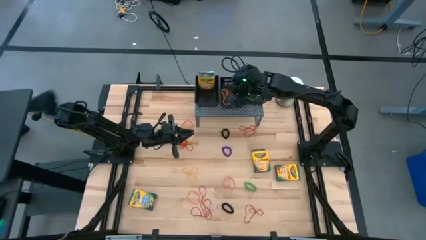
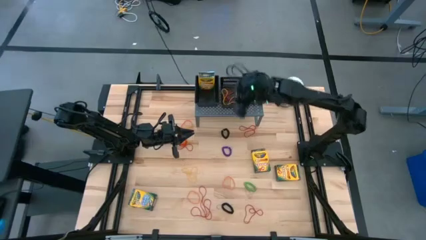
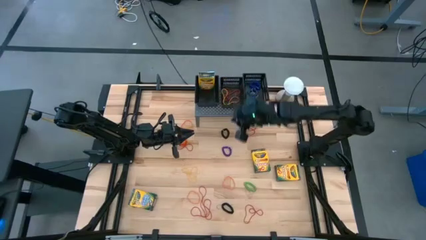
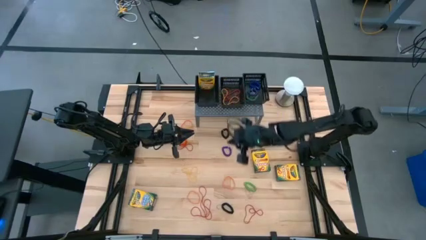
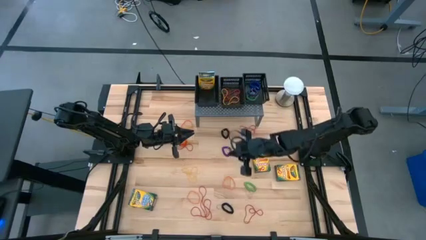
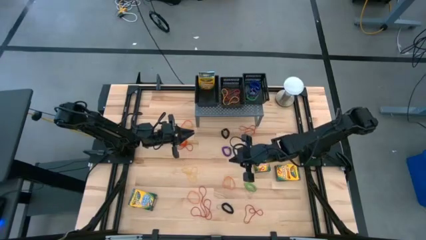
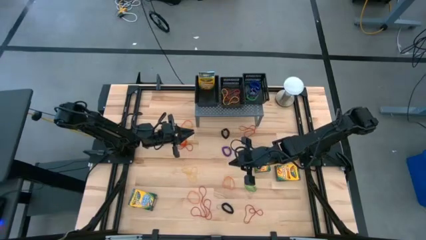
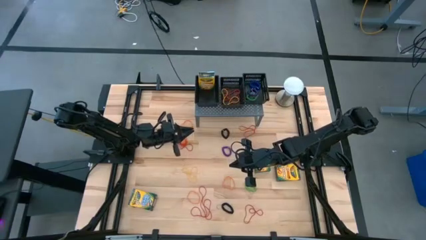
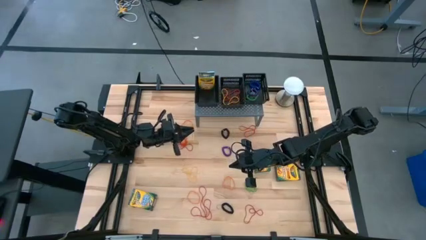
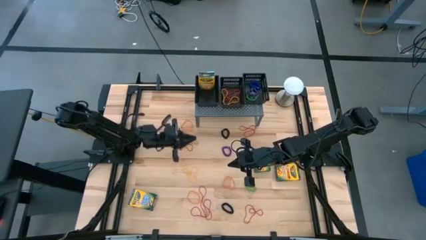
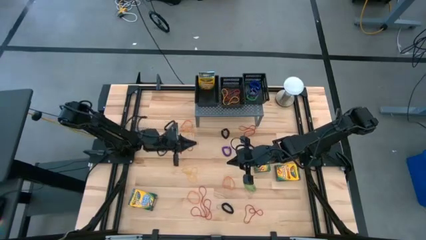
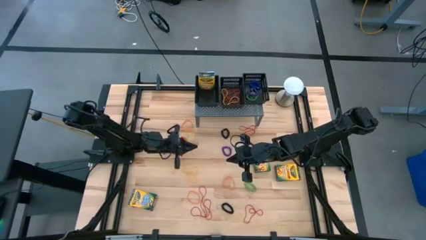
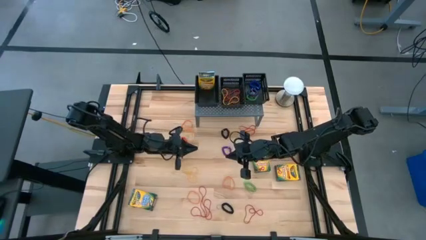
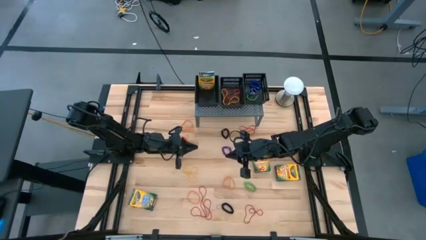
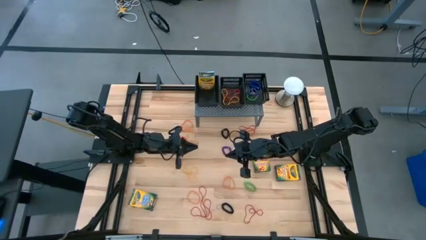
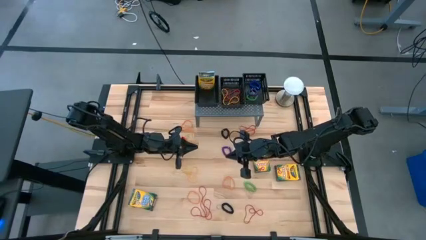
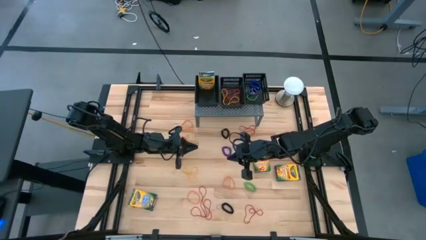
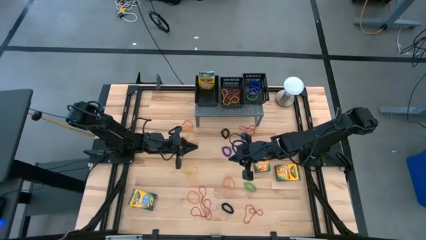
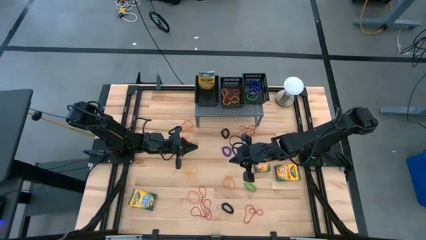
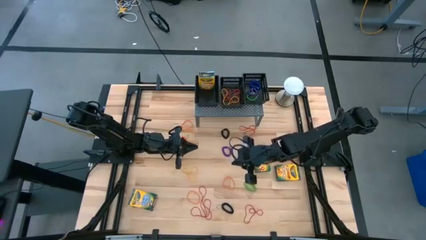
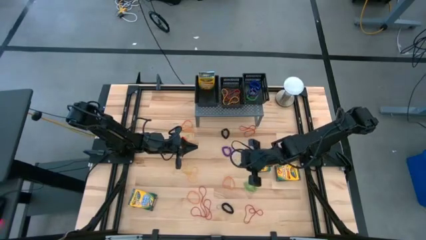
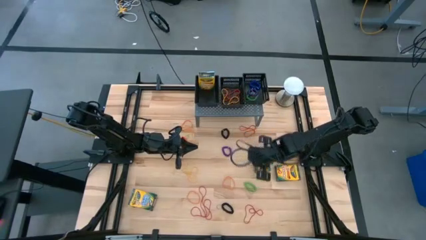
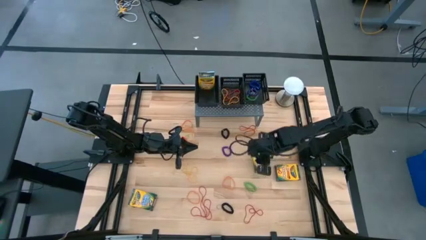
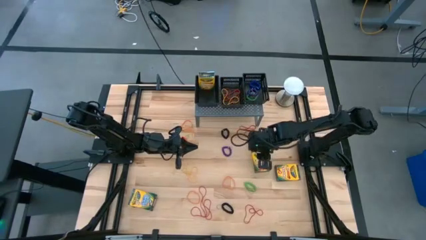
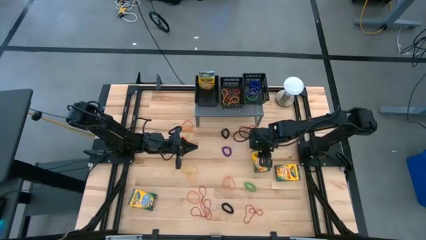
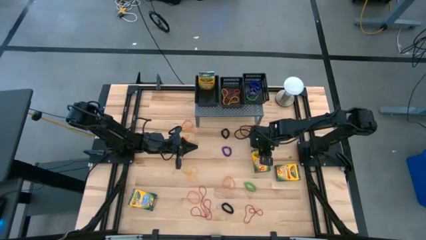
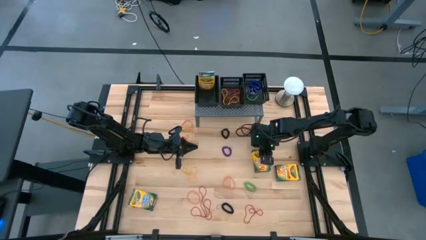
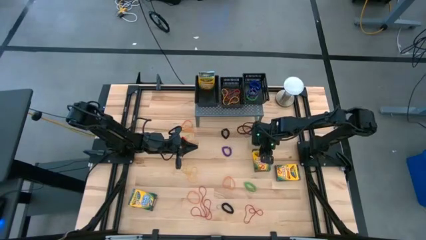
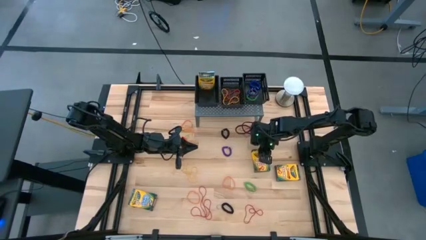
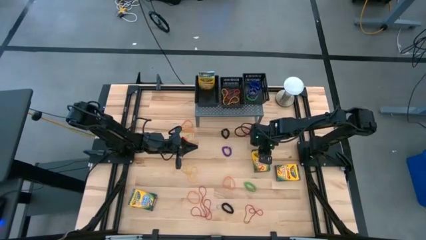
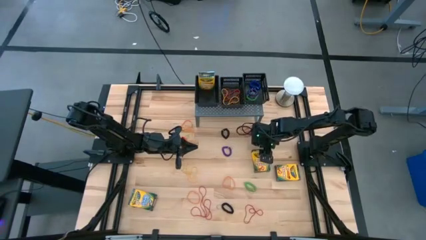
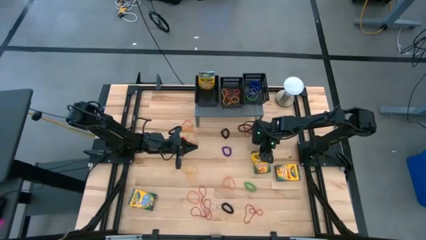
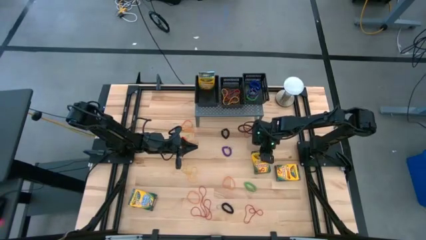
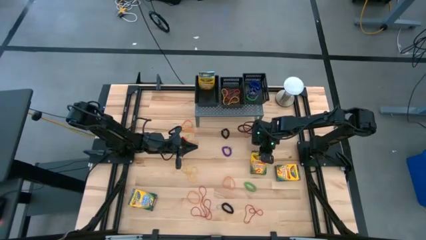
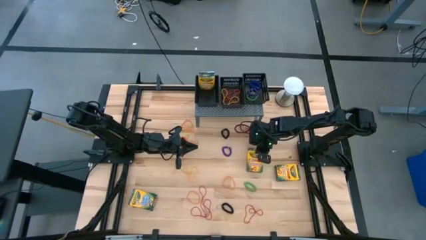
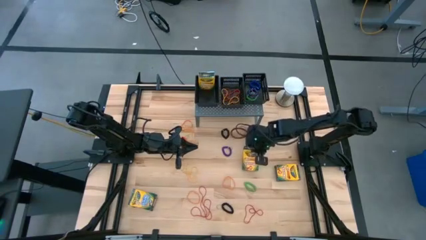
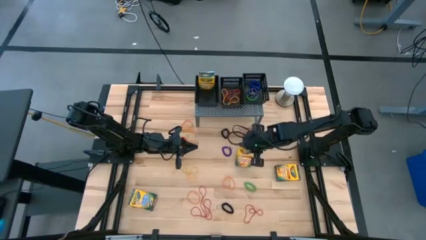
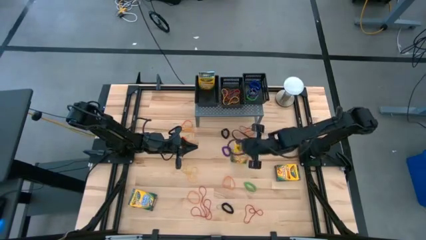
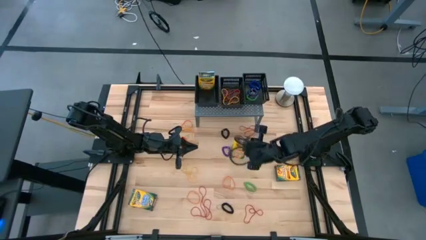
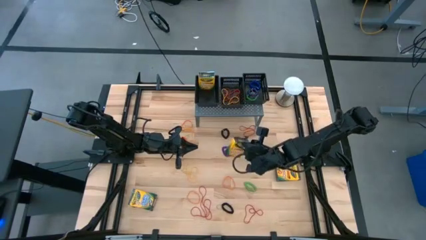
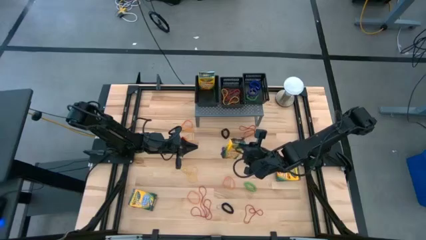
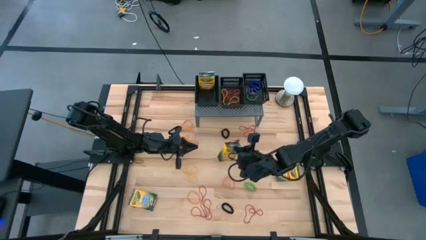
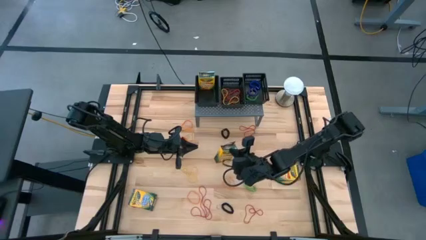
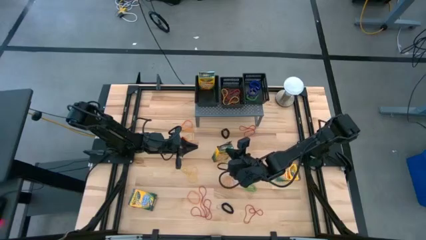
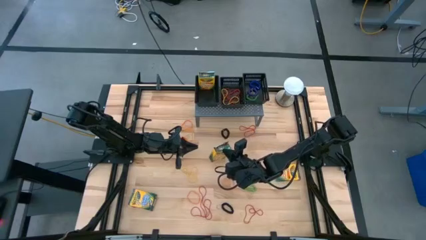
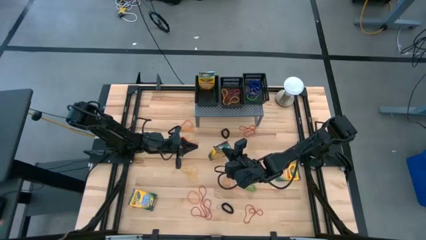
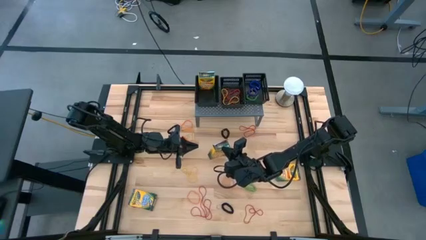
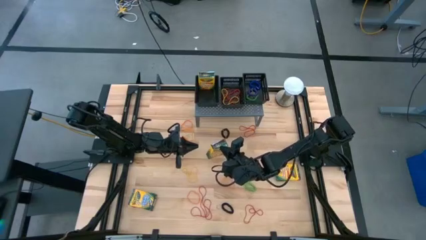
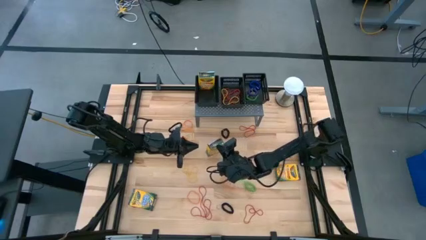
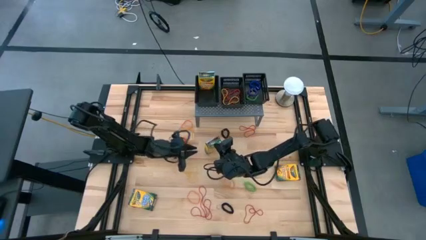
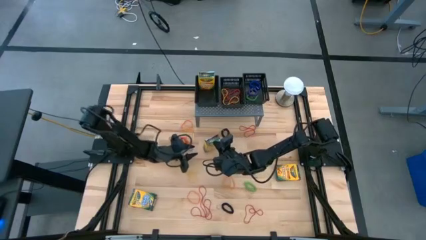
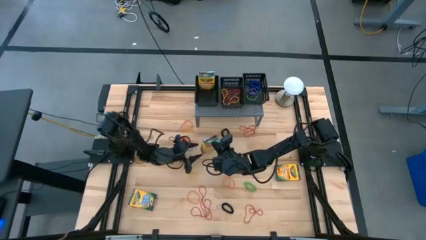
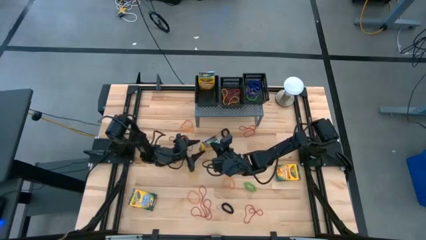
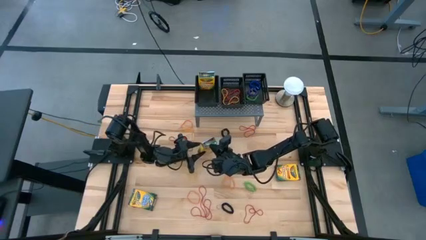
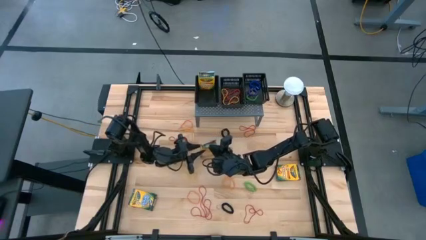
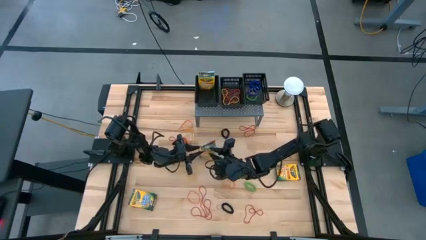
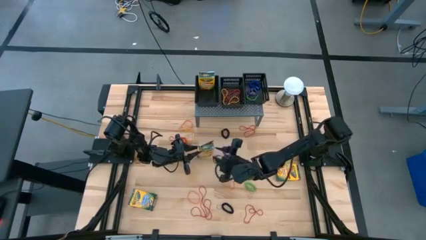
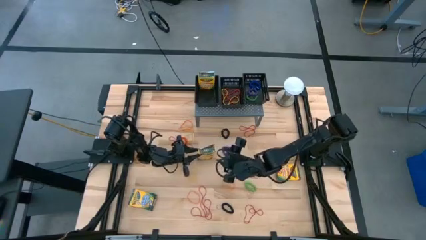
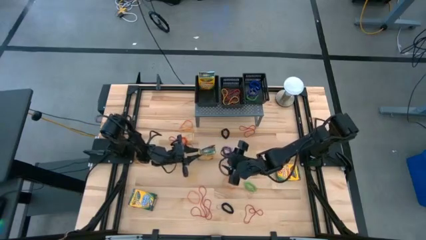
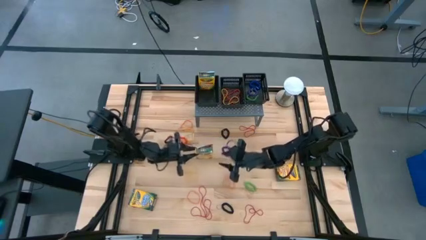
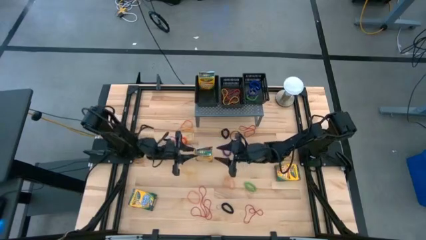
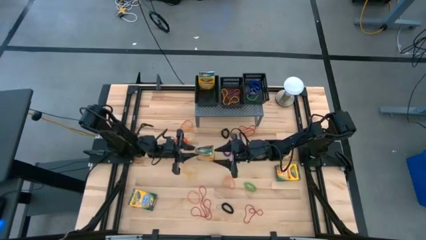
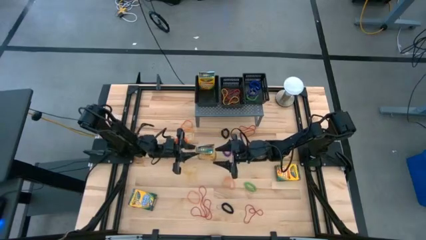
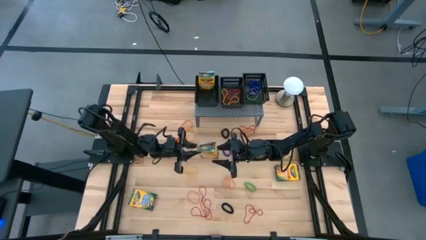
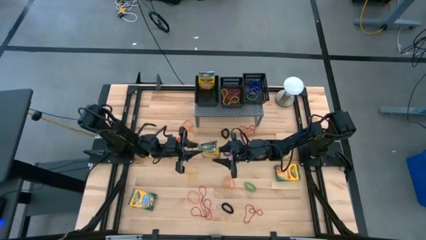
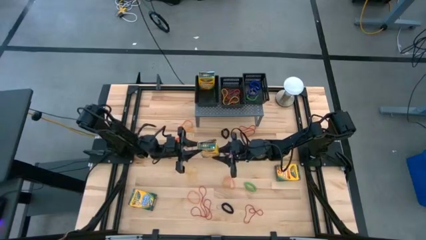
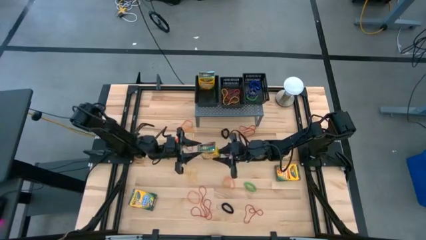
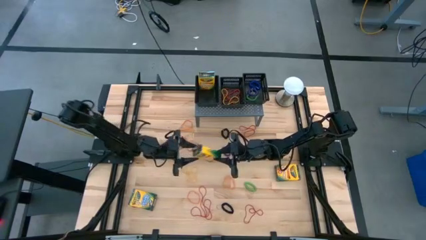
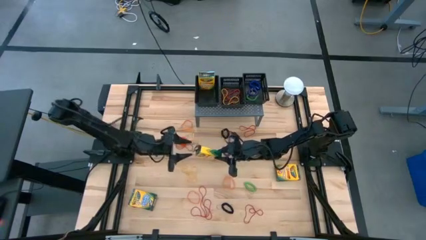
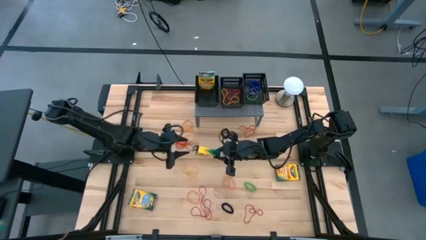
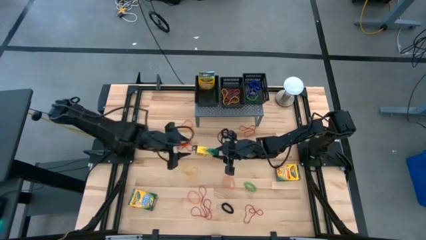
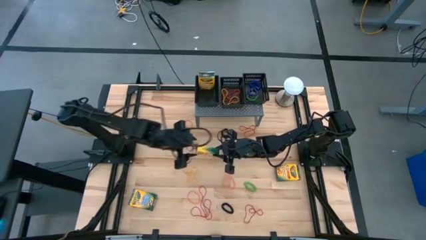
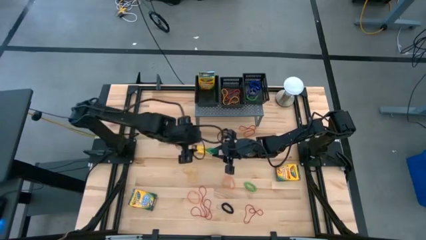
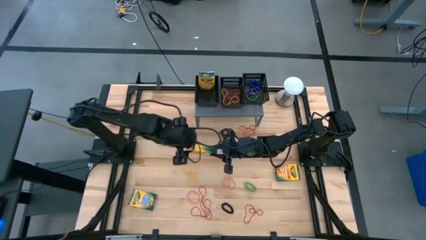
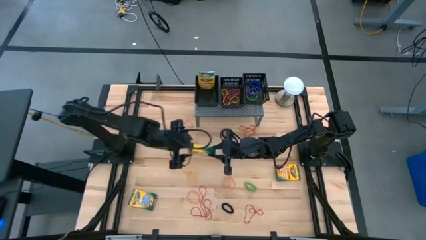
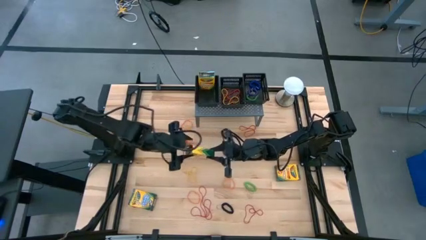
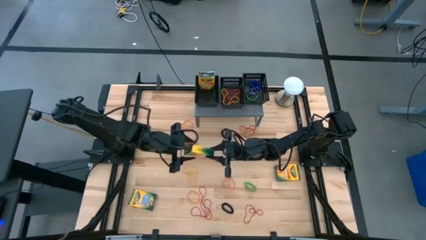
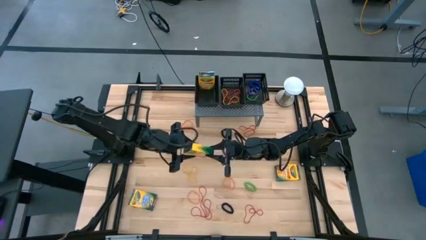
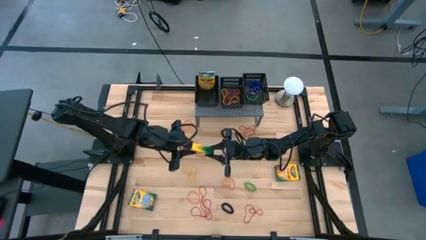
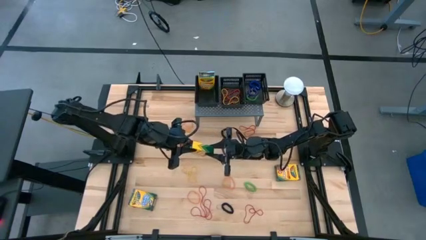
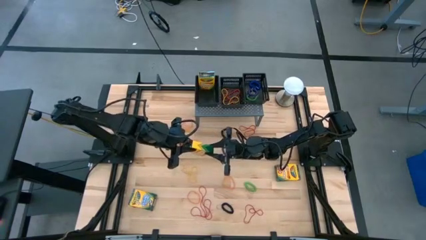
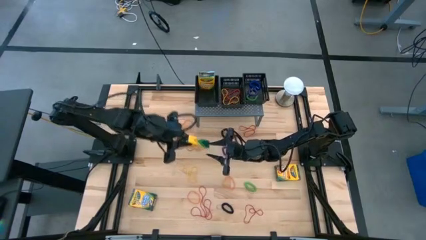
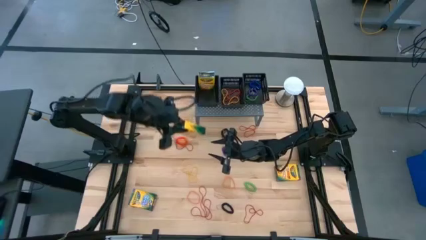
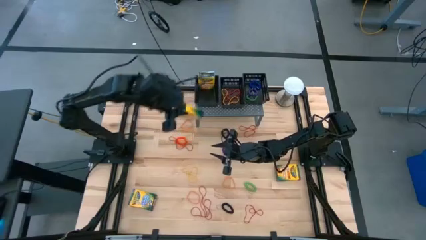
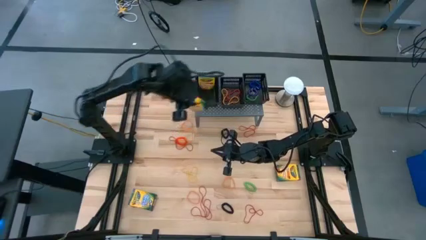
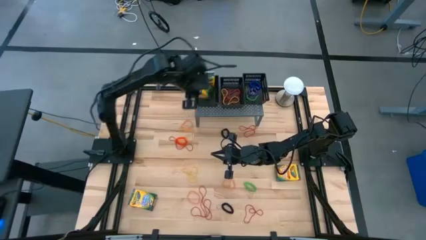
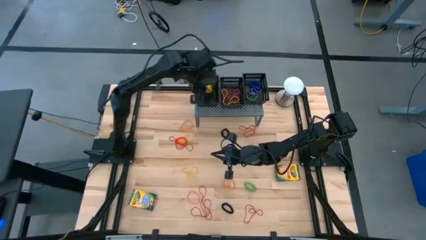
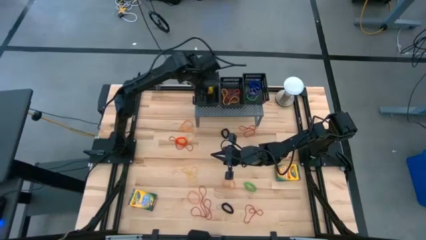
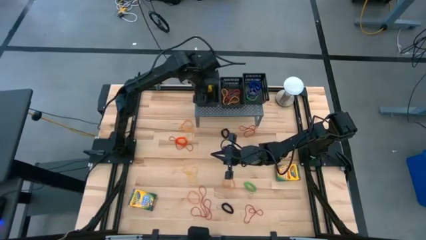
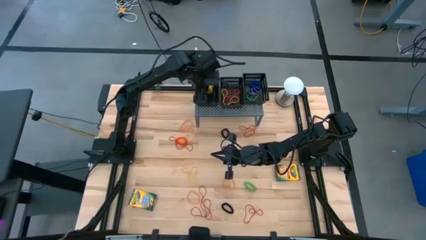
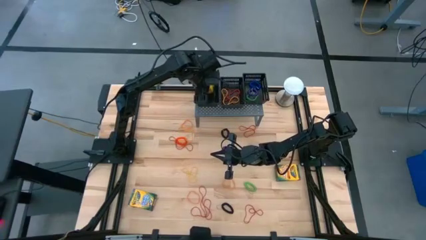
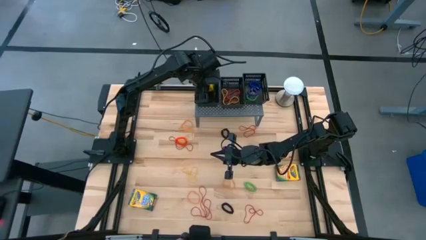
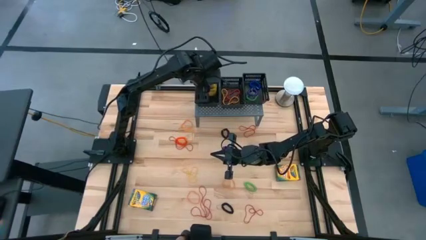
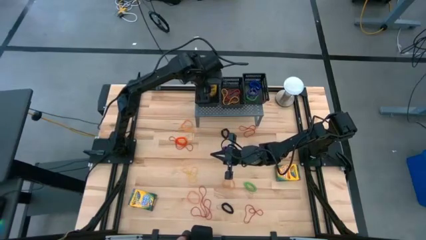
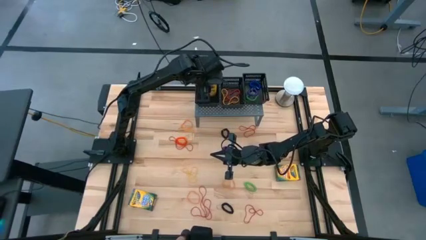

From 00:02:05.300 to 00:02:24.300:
Task: Sort rubber bands into baskets
Put the crayon box into the left black basket on the shelf
